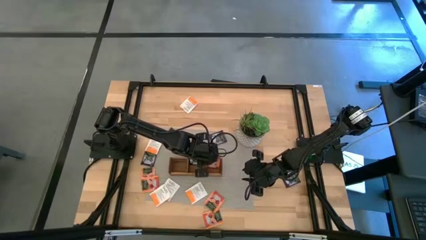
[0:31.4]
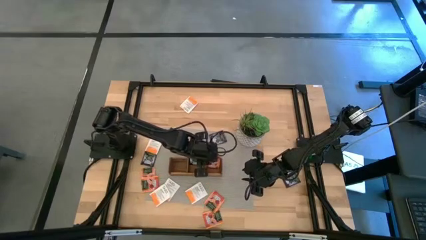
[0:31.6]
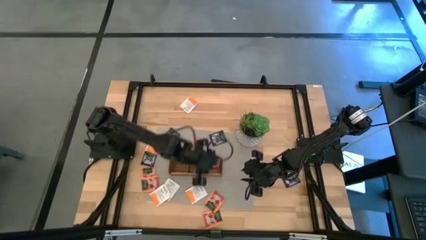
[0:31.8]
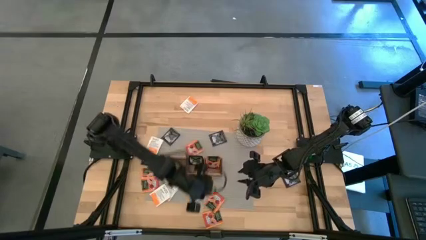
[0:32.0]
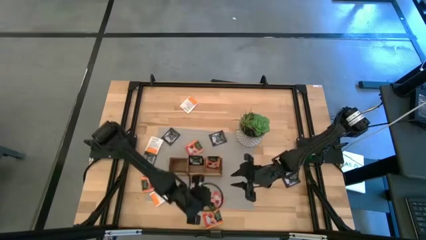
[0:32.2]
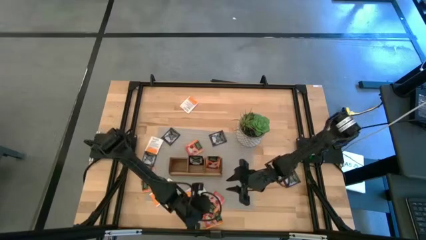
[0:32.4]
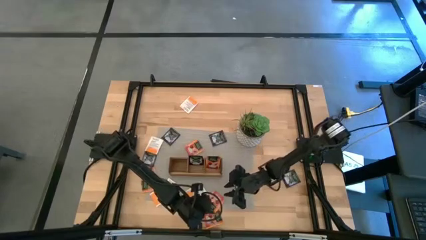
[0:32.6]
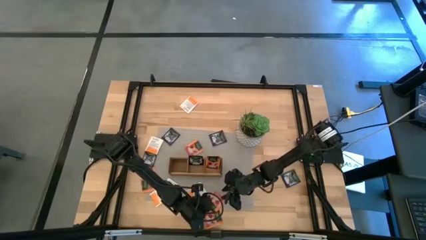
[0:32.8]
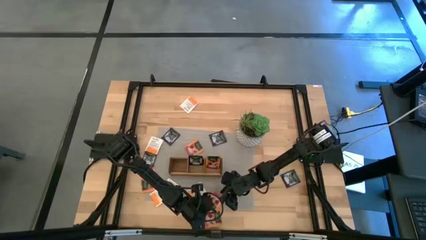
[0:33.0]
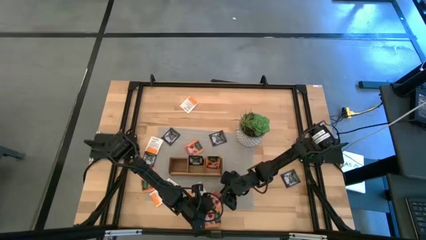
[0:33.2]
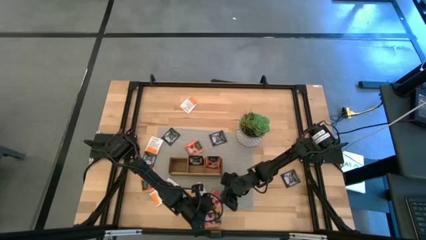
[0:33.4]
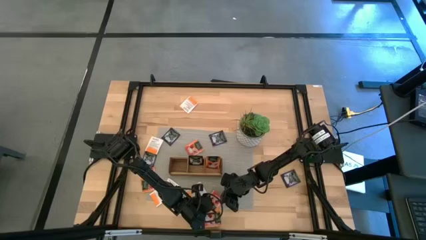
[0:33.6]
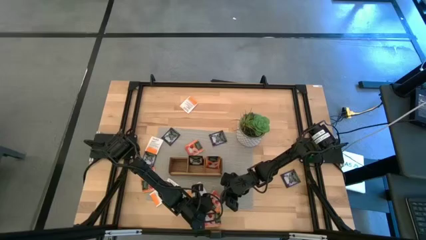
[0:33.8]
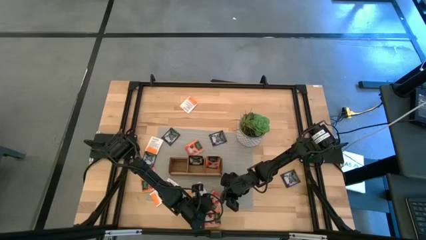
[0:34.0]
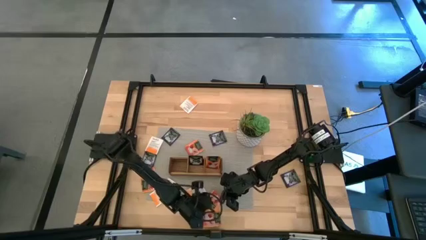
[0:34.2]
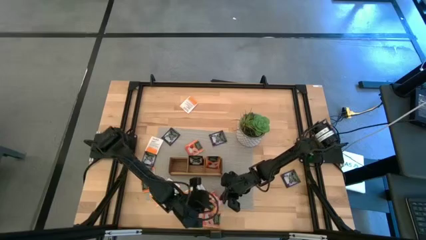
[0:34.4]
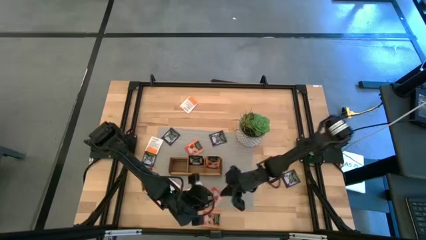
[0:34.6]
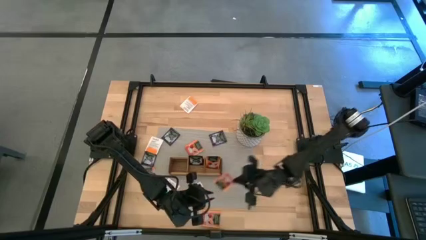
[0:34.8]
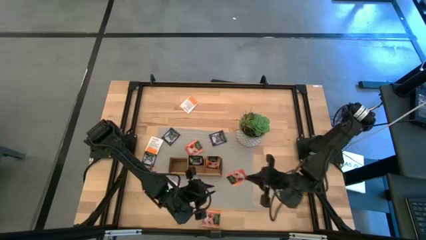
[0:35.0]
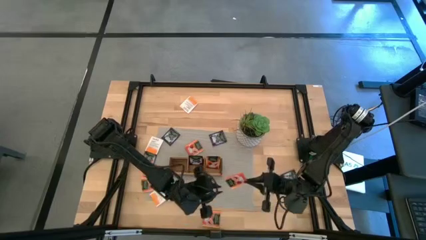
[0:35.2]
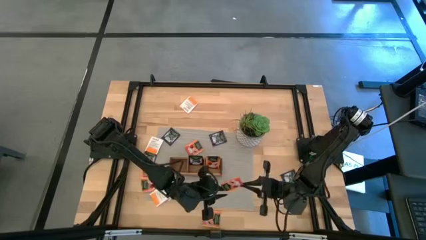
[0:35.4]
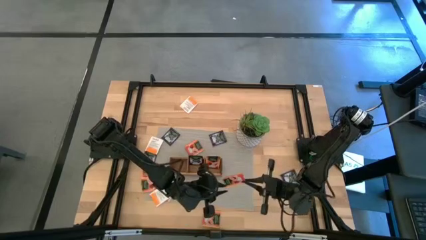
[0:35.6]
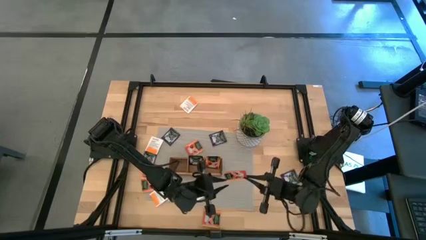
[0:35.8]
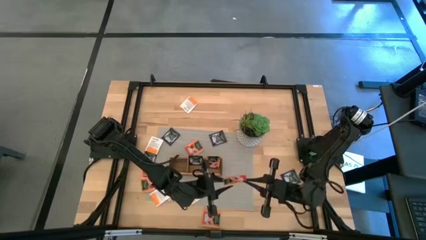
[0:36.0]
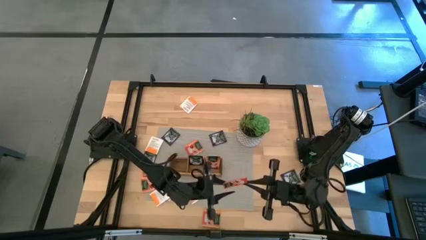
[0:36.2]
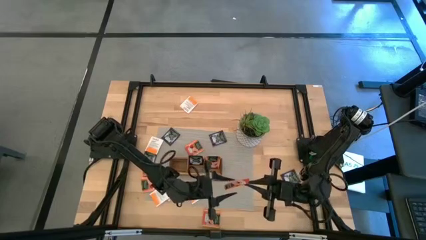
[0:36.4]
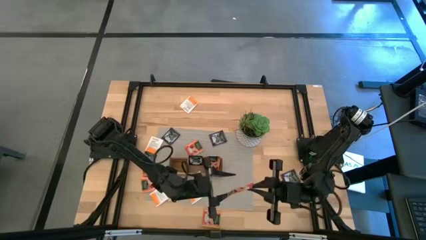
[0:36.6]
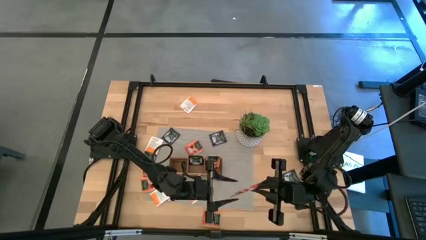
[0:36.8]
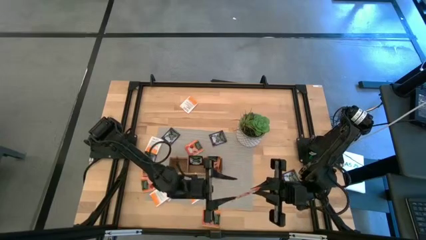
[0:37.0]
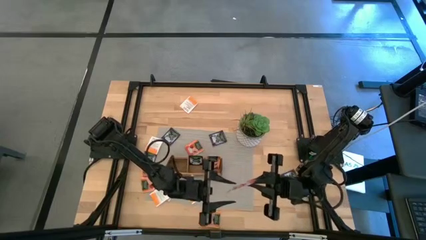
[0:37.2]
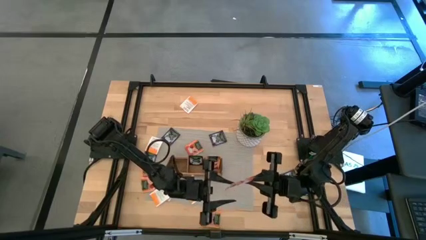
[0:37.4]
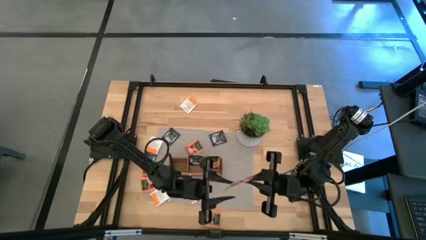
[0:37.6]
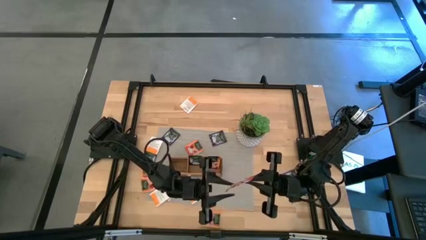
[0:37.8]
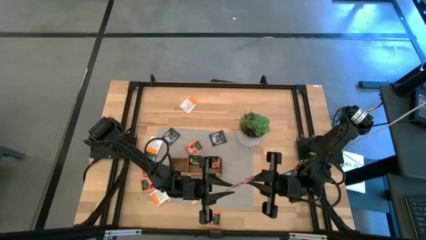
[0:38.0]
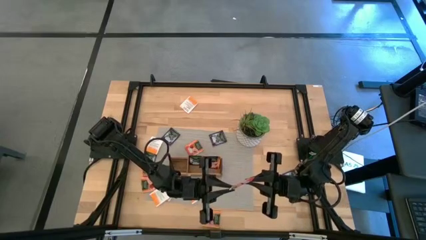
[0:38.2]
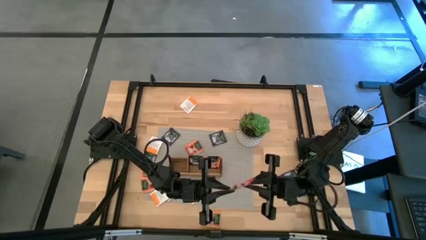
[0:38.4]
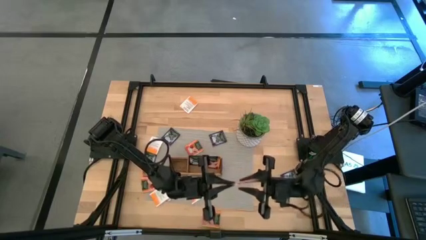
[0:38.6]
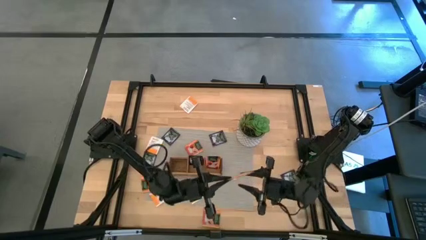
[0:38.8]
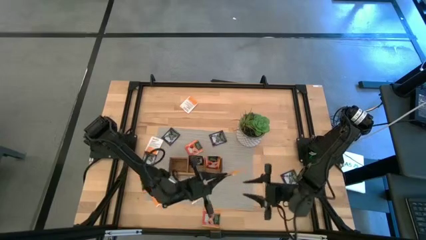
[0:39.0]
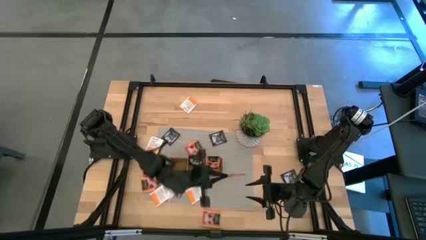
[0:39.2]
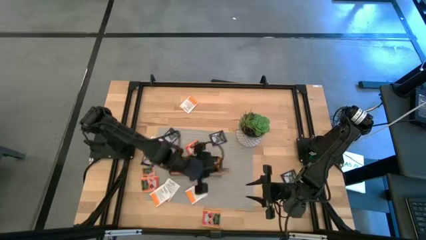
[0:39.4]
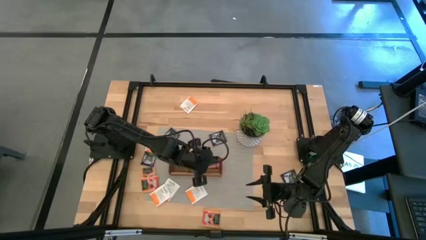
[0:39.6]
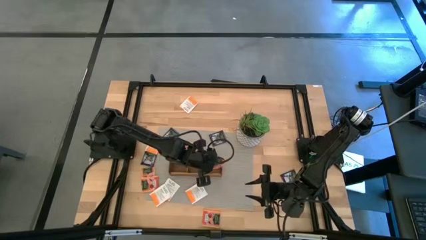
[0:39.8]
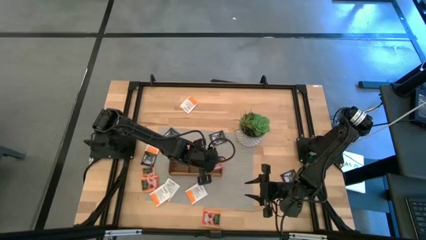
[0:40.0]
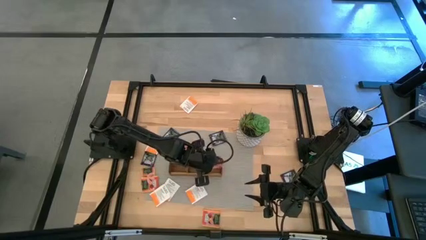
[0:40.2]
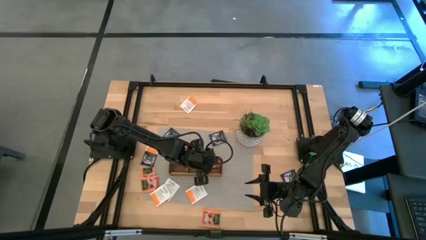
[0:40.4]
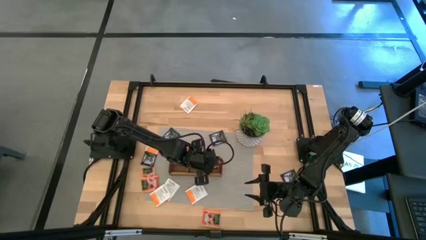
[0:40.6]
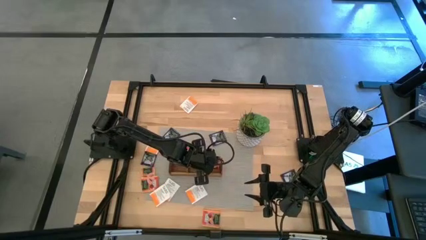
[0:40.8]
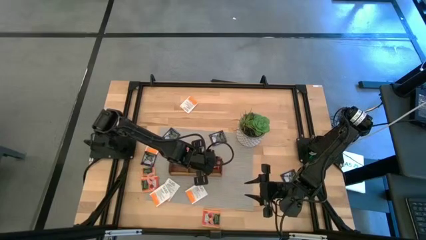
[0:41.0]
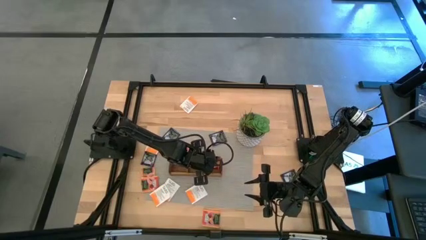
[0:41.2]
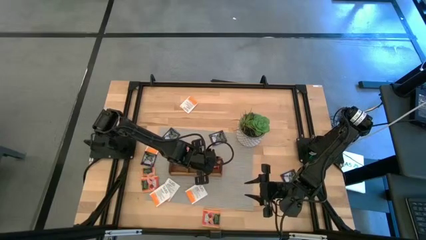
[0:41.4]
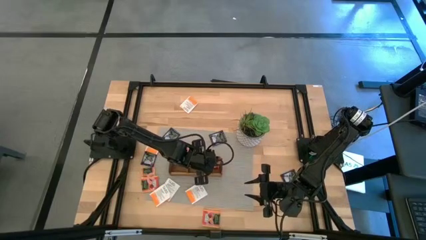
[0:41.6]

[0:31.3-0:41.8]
Task: Pick & Place Tea
Put the orange tea bag into the right section of the wooden organizer

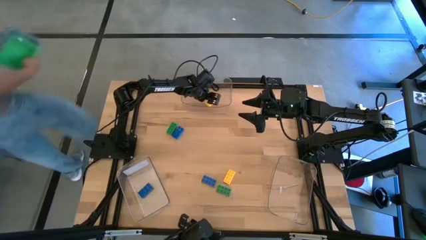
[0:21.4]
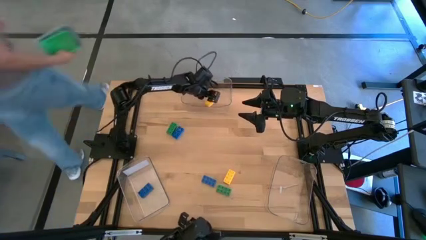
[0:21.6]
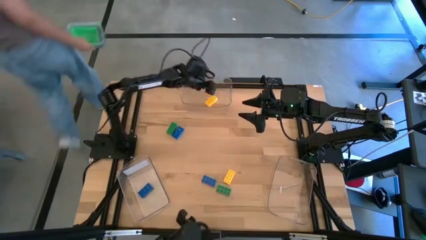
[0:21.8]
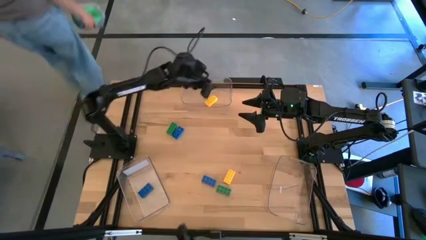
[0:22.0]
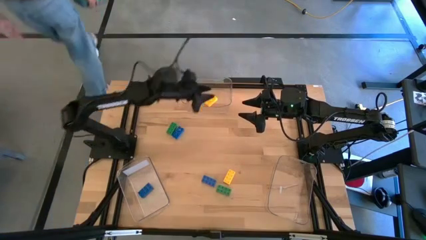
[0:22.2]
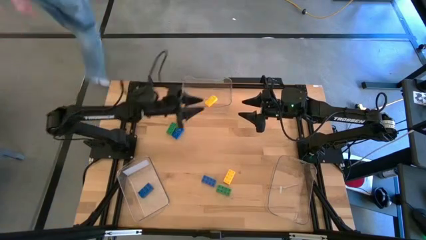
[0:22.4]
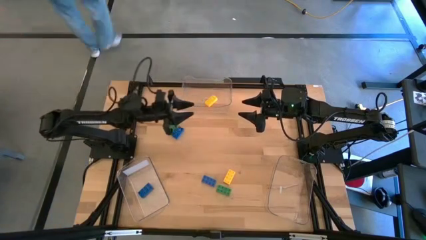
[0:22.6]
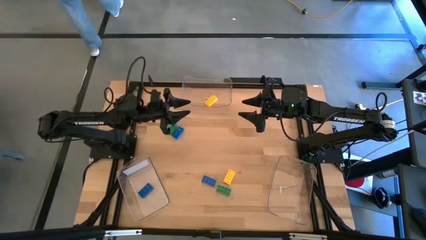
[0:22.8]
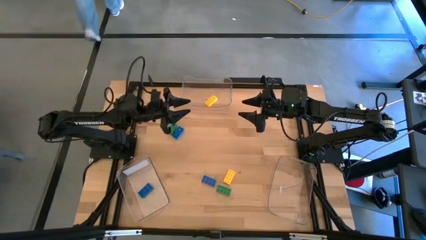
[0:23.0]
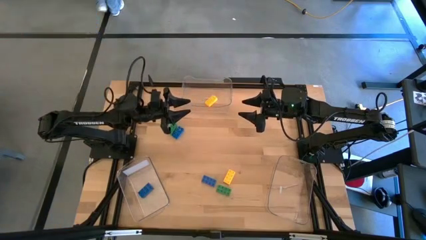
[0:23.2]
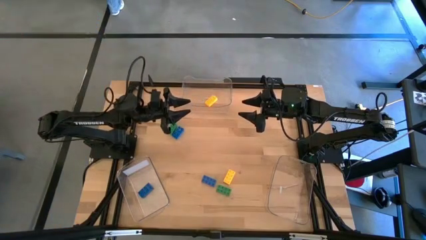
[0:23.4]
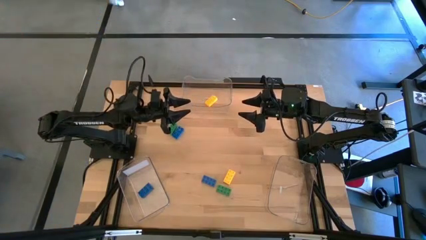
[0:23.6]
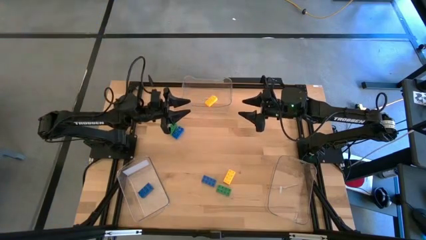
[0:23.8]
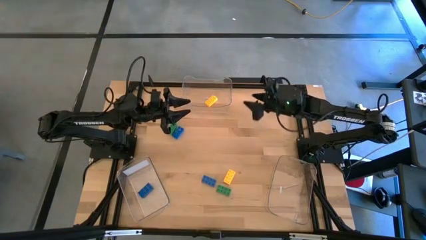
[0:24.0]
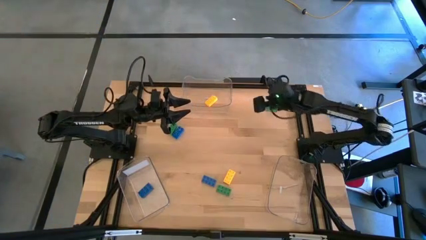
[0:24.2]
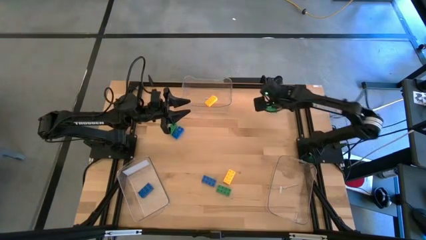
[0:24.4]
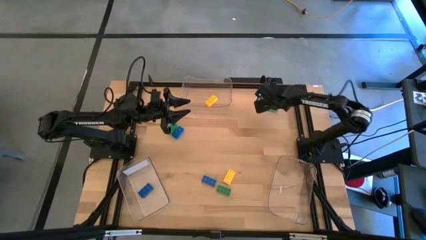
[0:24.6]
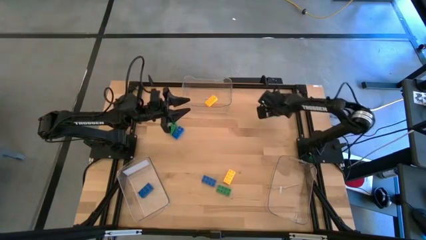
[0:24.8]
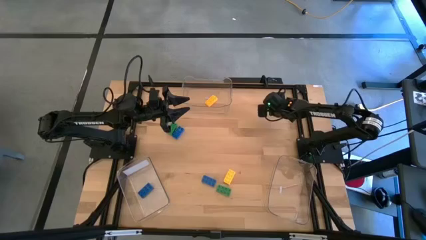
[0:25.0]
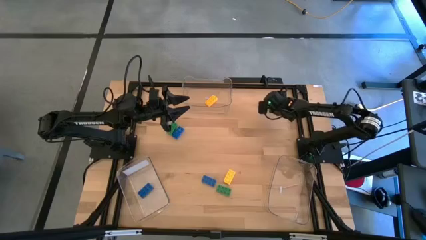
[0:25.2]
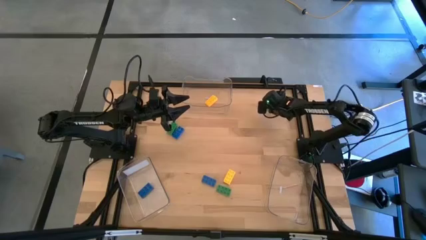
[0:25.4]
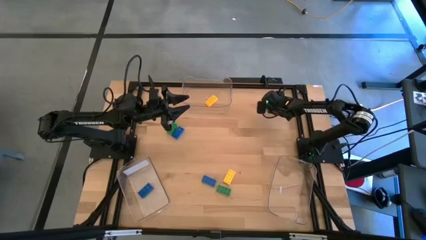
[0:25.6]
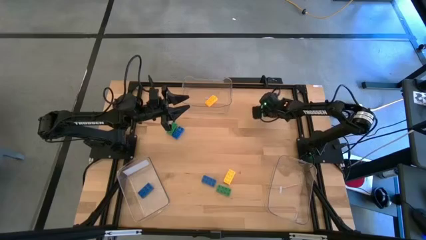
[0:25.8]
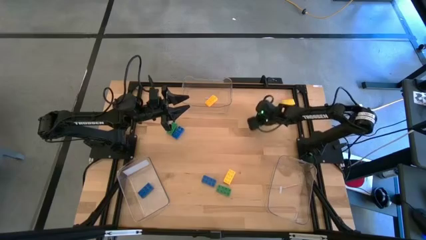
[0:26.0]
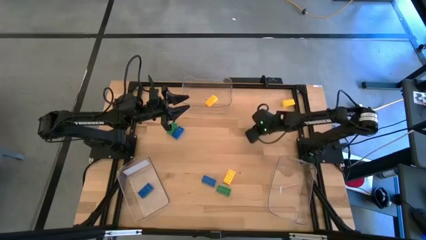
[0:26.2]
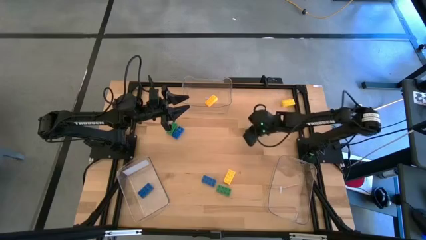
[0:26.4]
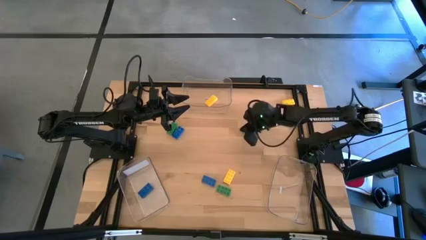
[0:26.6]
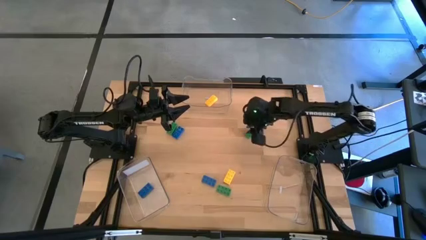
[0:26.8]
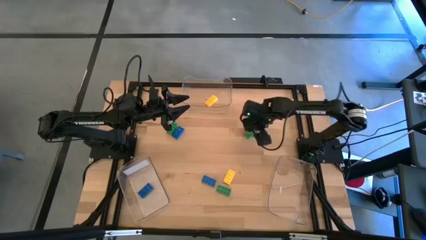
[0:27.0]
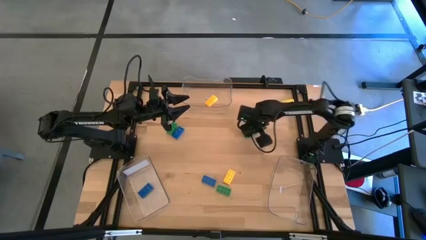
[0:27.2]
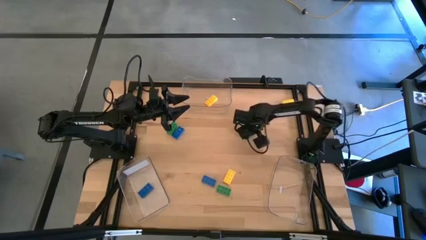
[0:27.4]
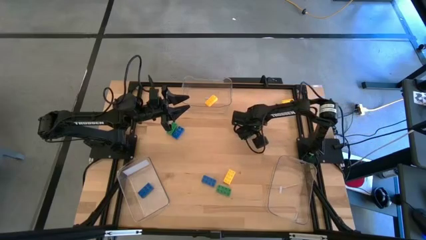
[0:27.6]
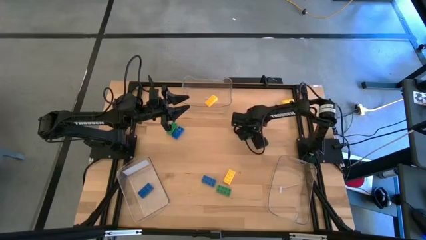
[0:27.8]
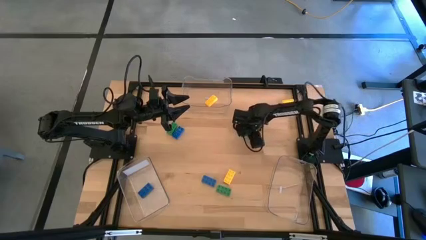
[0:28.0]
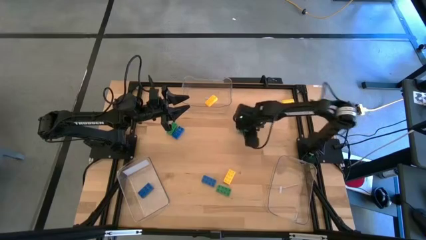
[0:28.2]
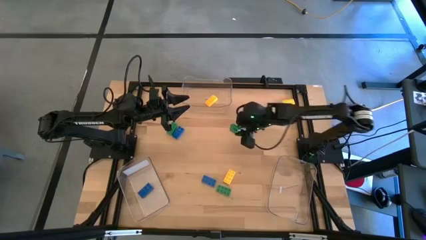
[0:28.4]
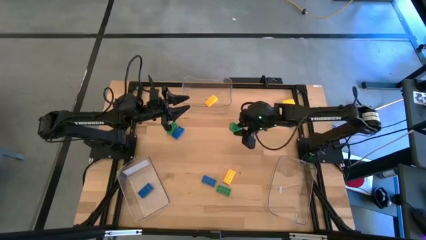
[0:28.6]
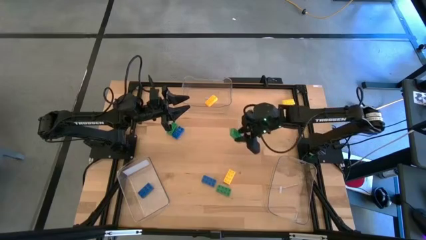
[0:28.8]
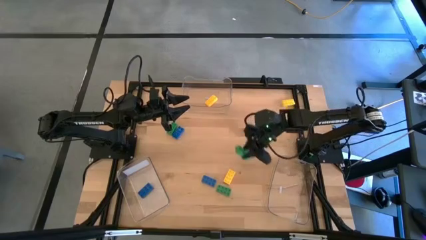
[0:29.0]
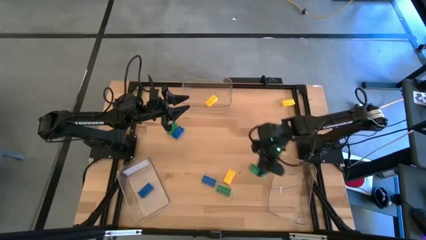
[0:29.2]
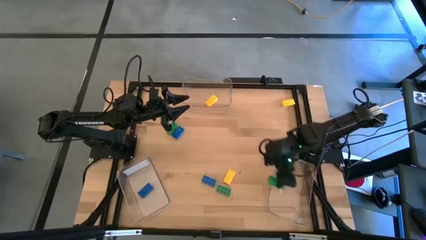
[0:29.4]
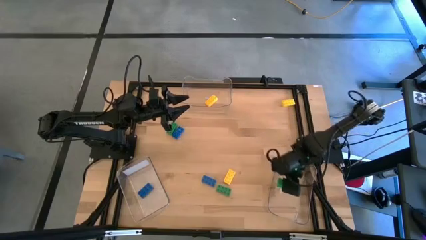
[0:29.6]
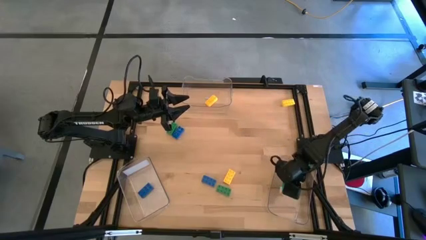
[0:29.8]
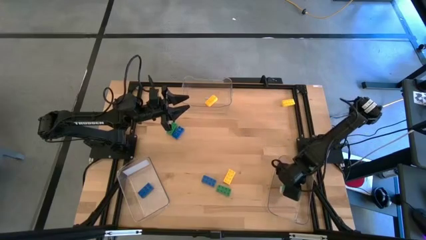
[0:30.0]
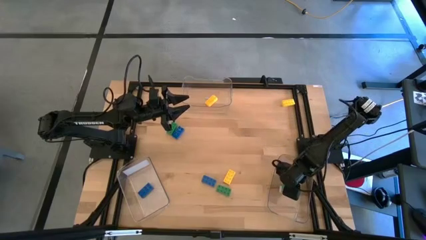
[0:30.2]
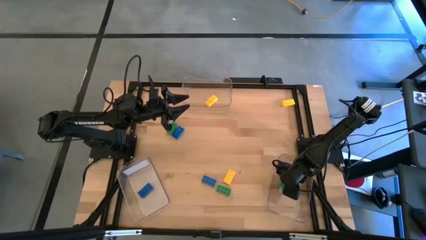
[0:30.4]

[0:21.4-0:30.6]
Task: Sort & place blocks by color
Put the top right green game piece into the bottom right transparent bin
